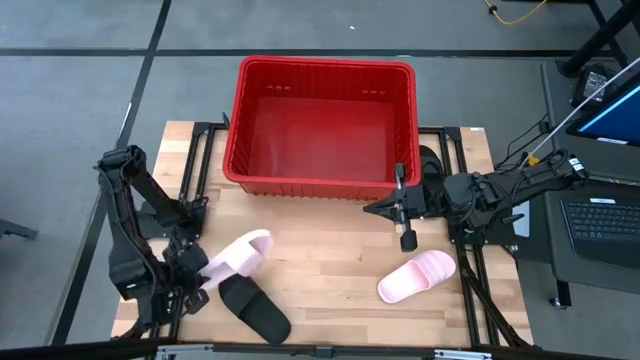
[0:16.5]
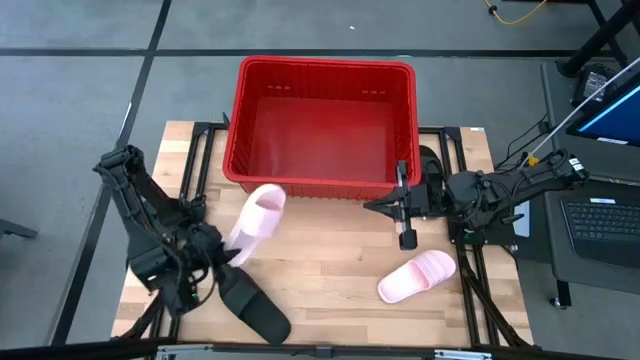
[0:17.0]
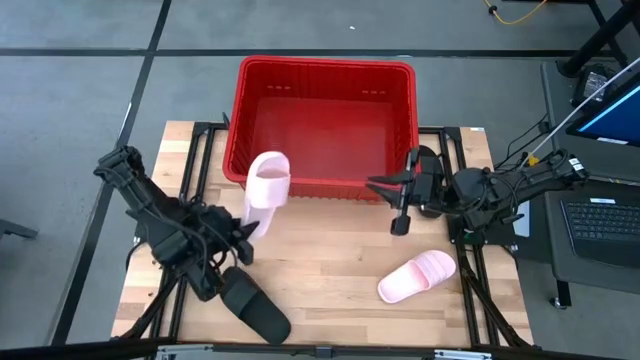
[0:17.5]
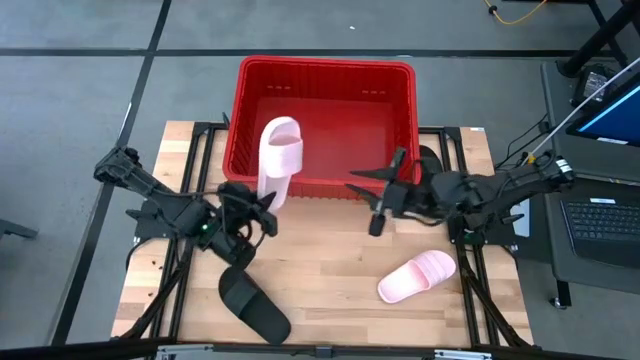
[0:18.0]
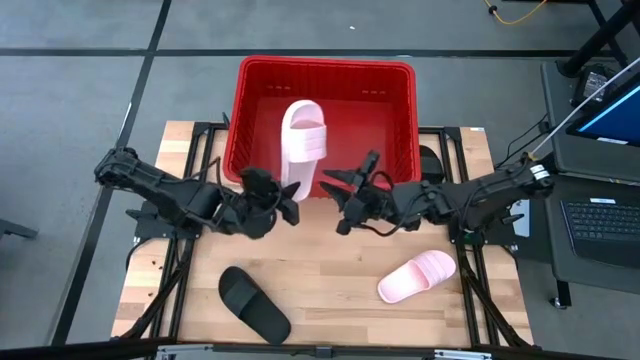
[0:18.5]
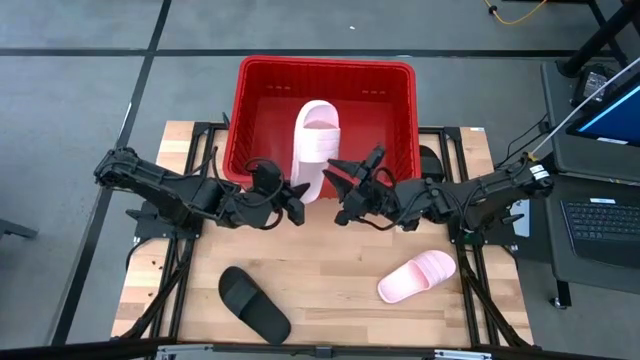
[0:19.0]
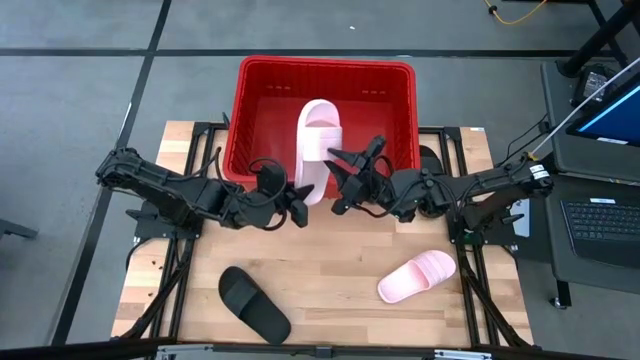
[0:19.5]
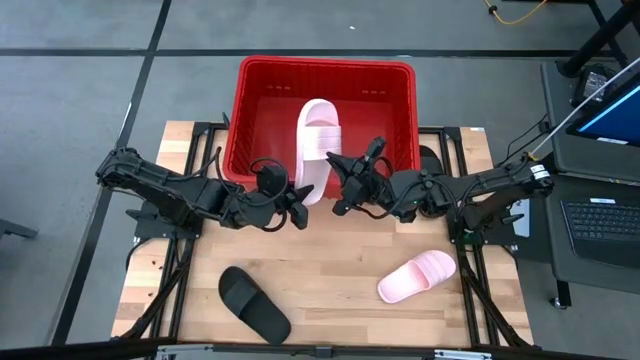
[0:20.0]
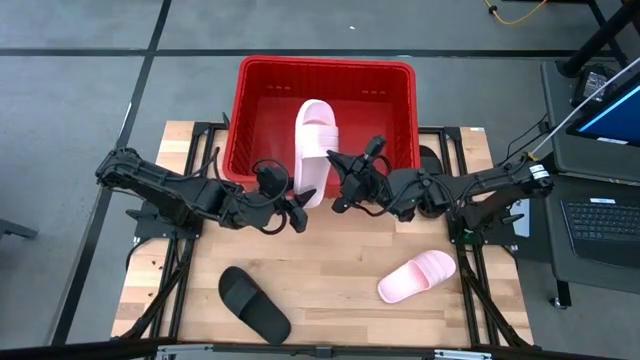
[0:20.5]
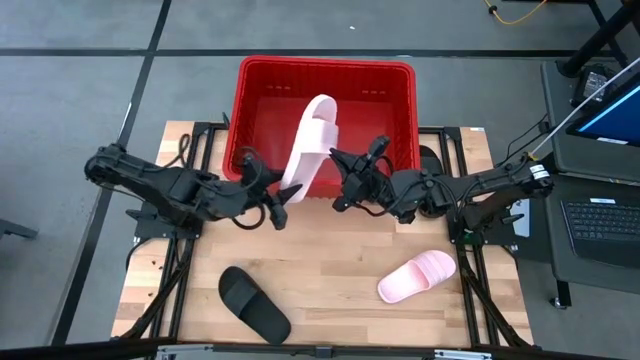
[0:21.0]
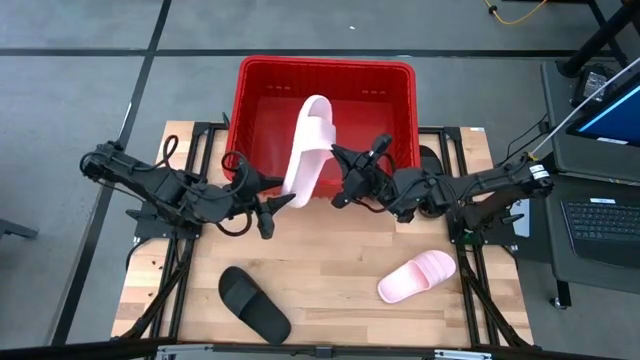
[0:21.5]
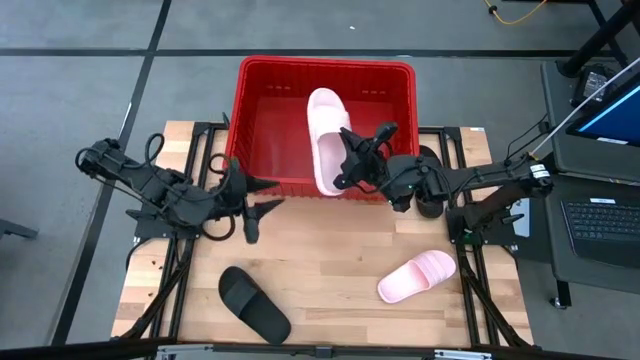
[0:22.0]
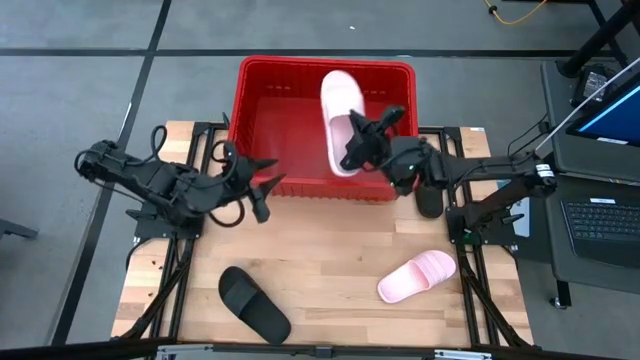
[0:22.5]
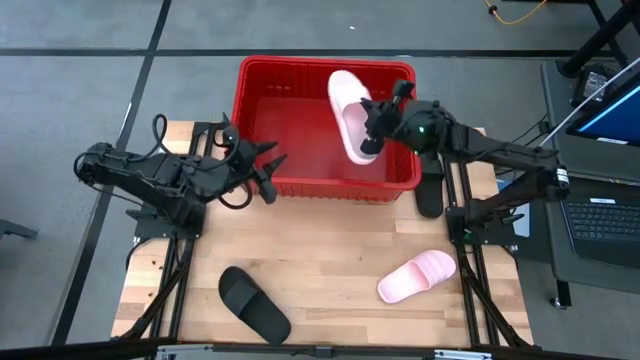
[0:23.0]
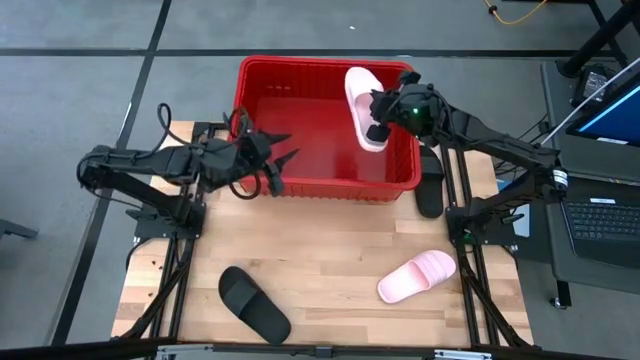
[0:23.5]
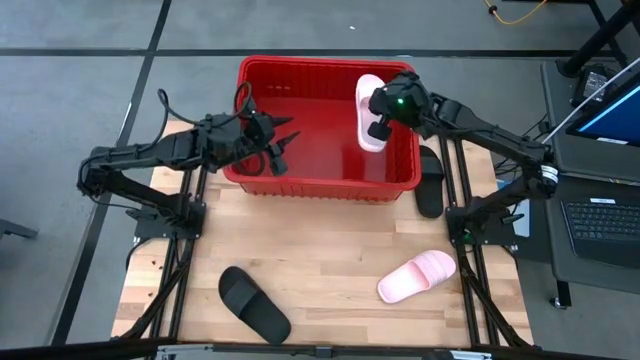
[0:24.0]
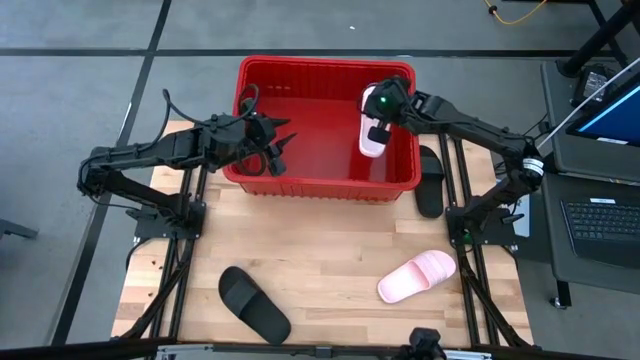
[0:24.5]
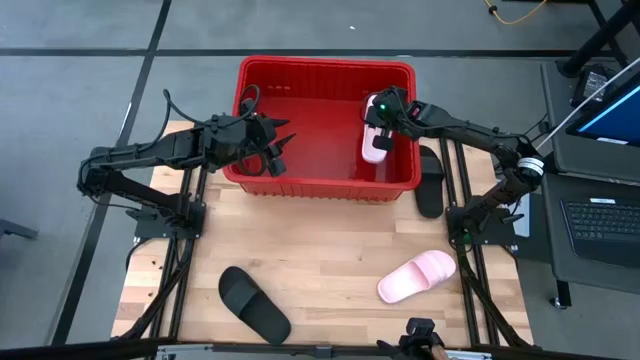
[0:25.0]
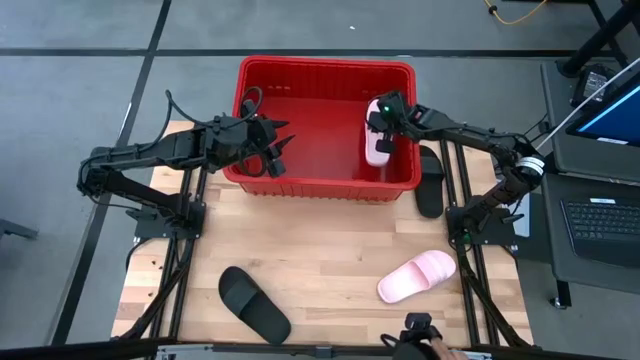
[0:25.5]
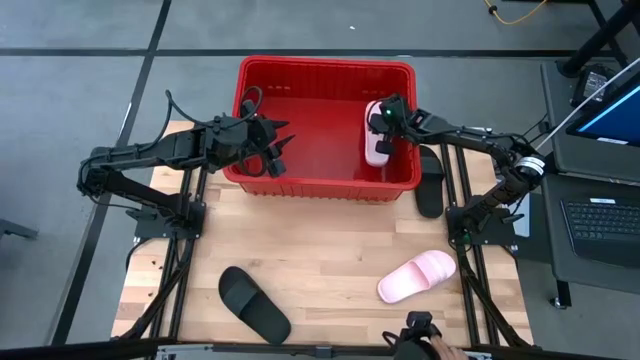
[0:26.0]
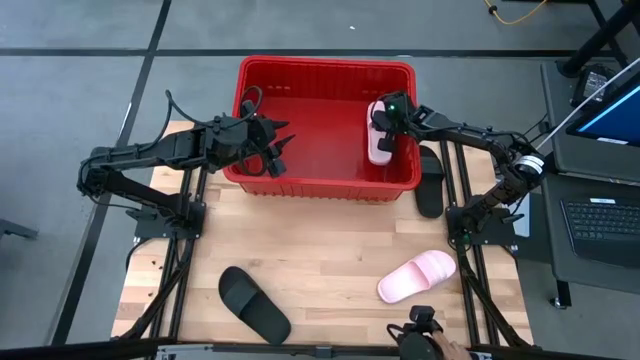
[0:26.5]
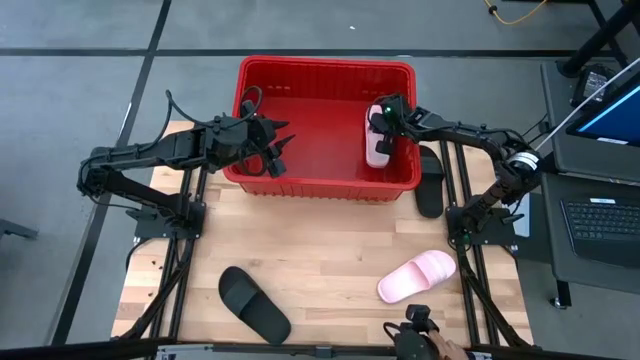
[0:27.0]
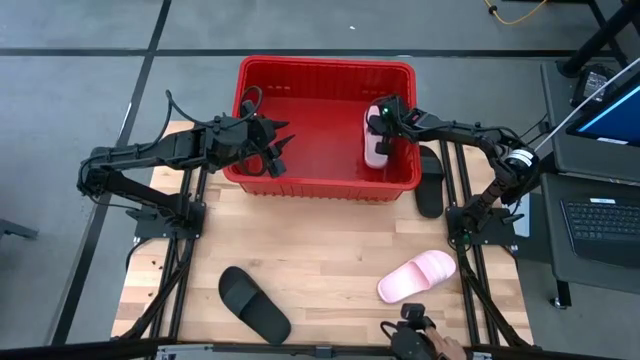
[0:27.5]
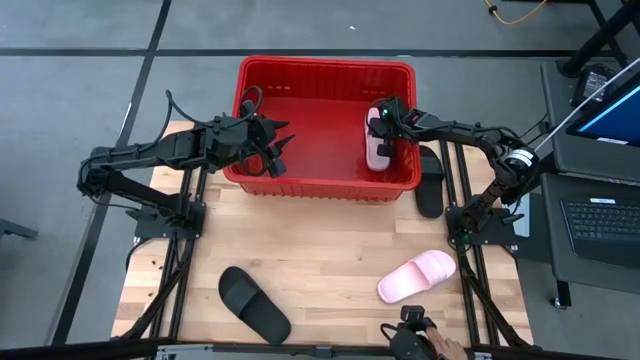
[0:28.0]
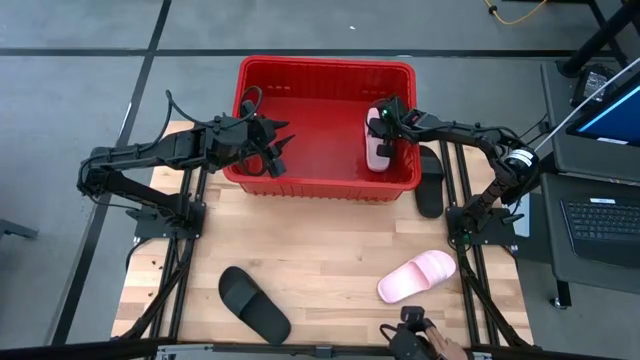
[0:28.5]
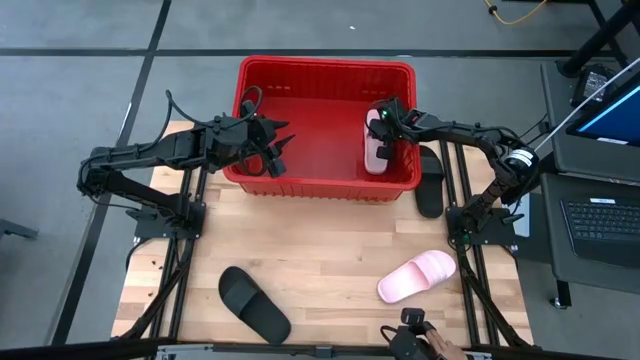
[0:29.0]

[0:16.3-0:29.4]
Task: Pick and place slides into bin
Put the left pink slide into the bin

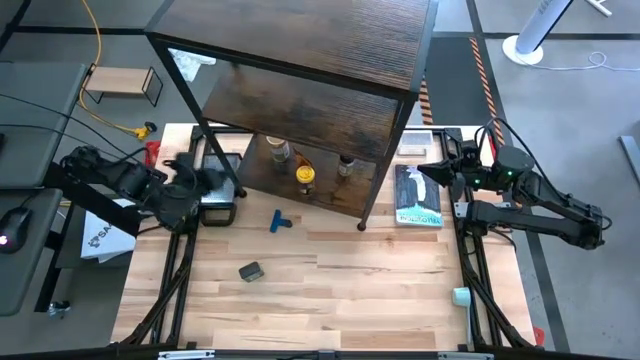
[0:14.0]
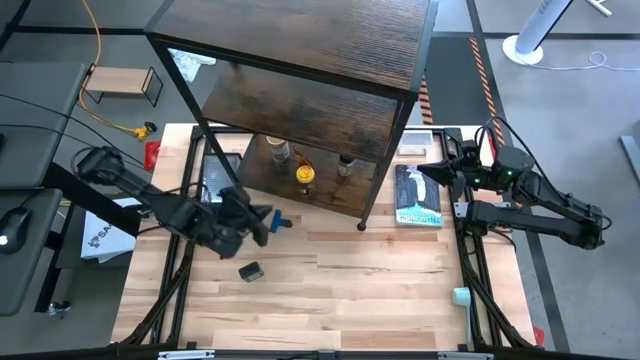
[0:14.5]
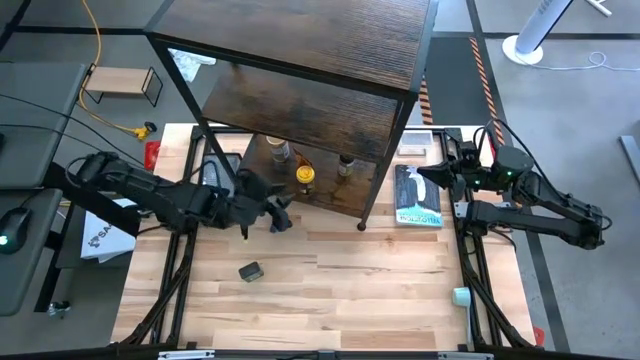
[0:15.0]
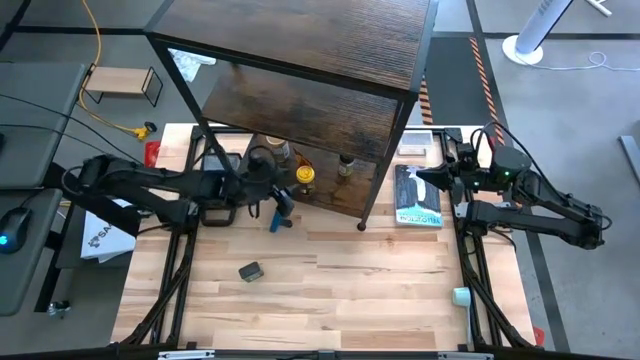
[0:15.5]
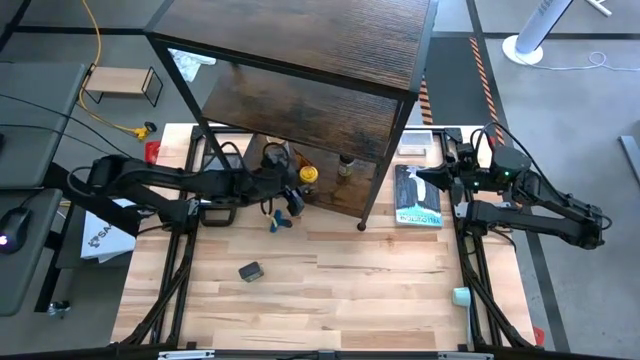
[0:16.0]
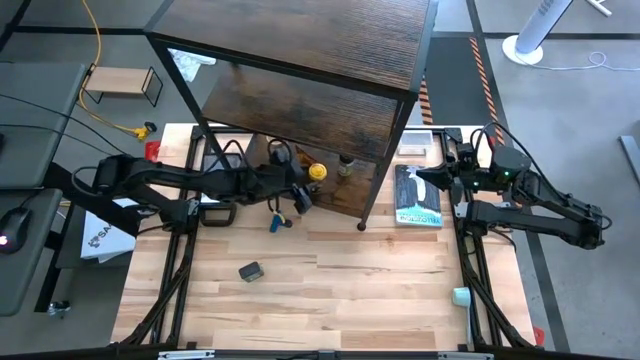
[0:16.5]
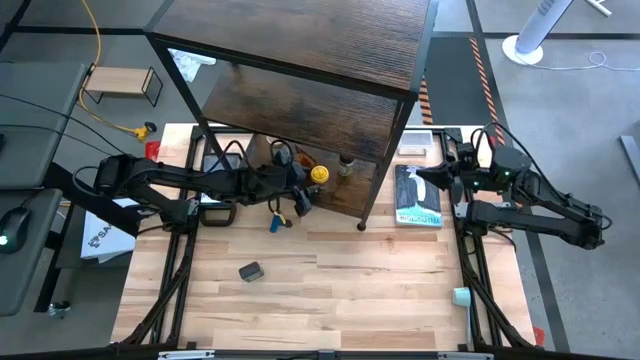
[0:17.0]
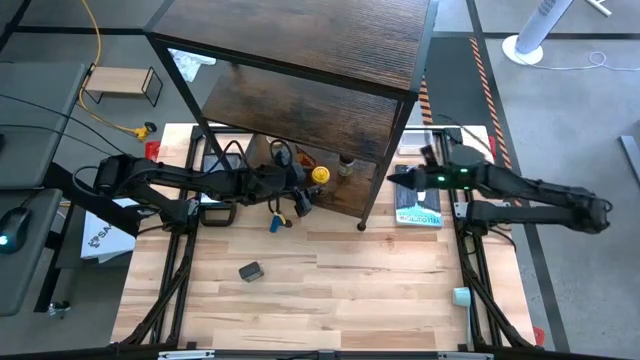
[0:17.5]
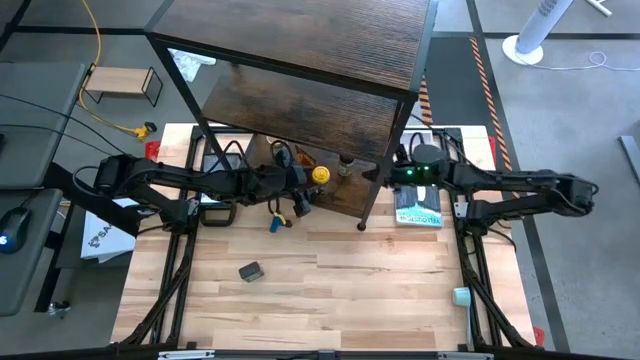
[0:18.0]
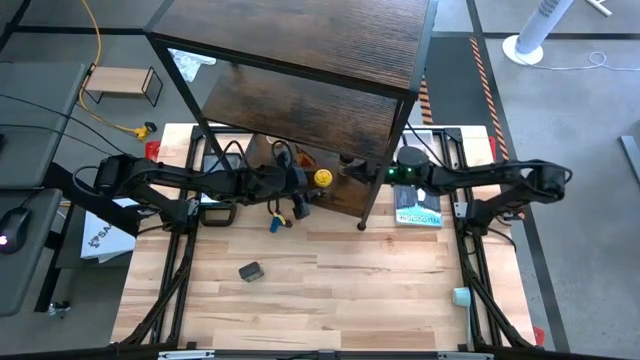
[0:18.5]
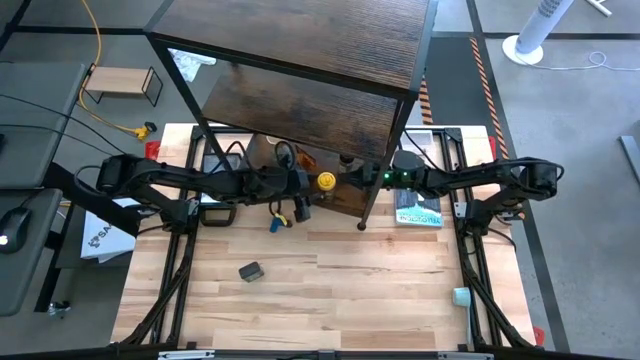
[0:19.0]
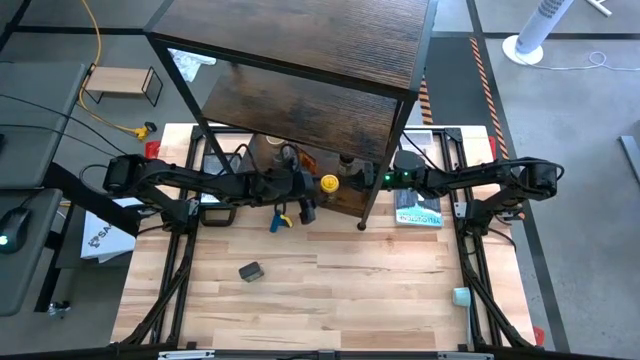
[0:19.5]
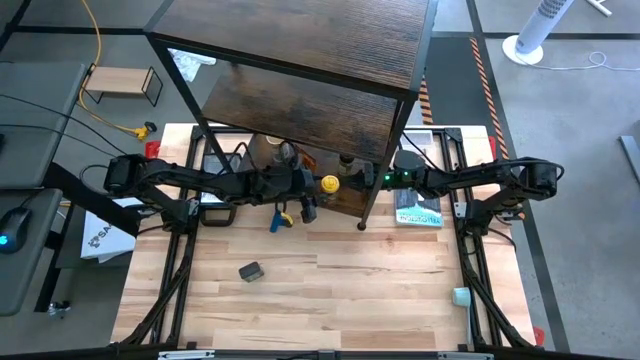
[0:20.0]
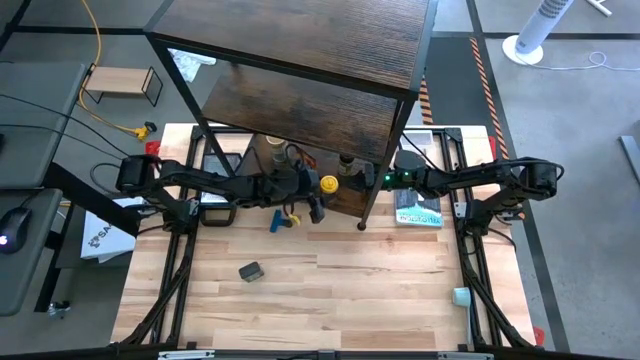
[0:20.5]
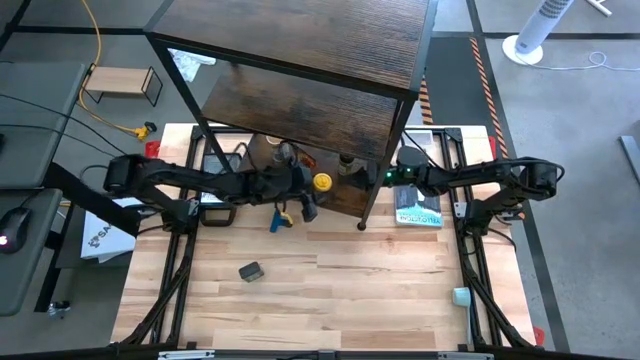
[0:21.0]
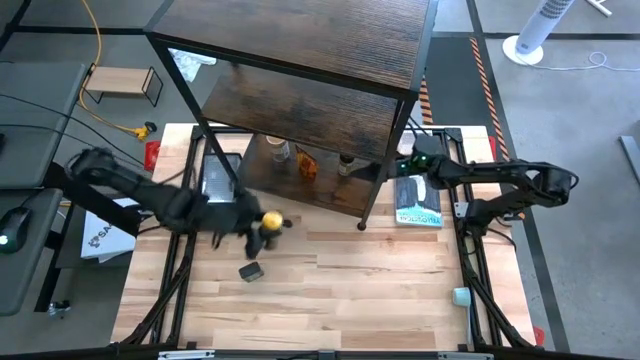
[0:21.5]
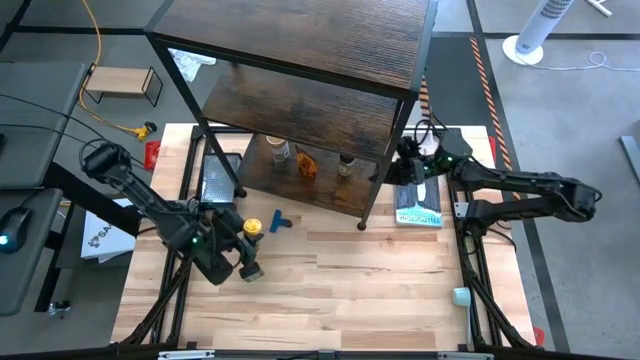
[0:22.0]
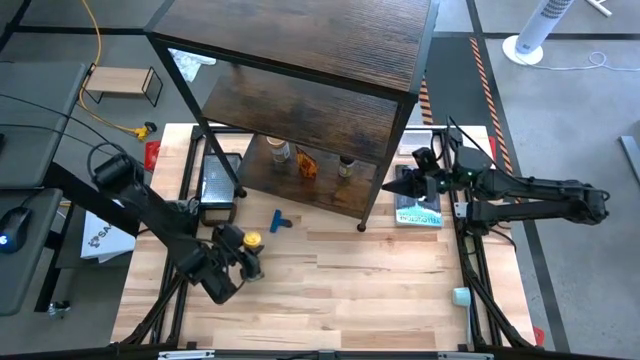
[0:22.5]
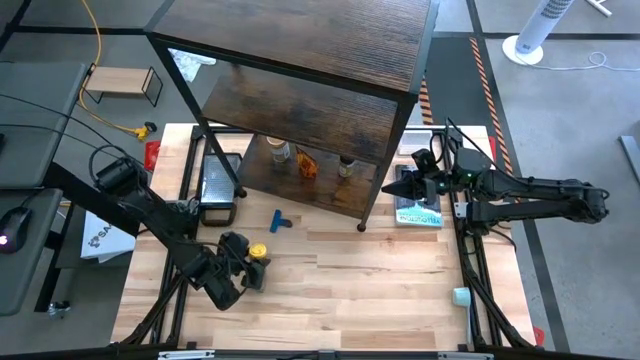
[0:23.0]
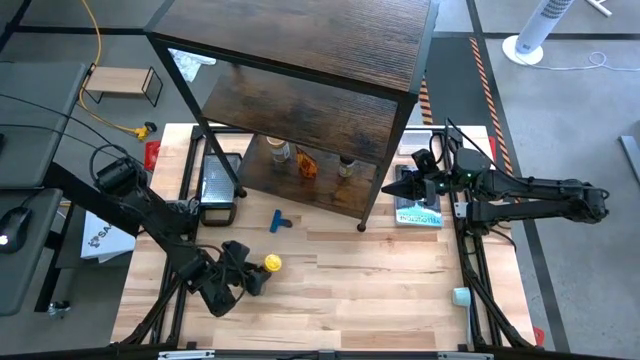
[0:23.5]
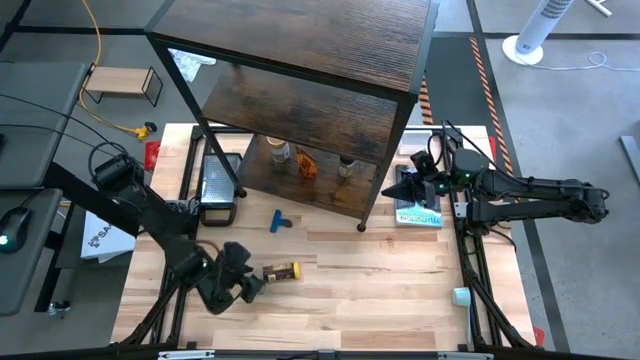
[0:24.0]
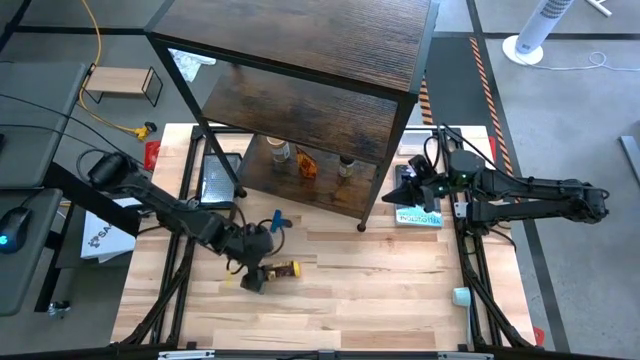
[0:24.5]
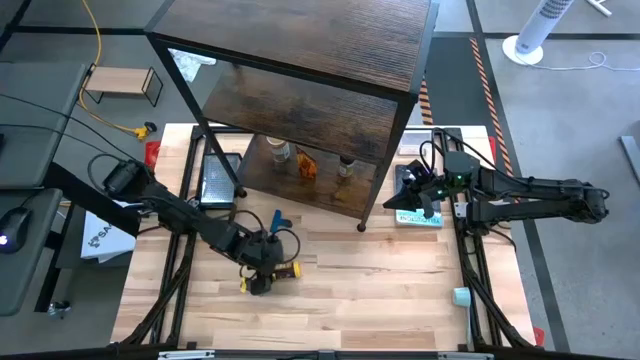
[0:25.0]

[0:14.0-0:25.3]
Task: Shelf spices
Remove the yellow seasoning can from the shelf
